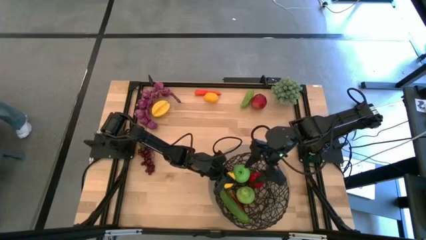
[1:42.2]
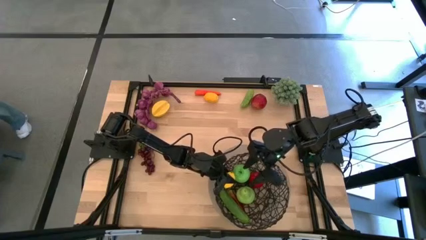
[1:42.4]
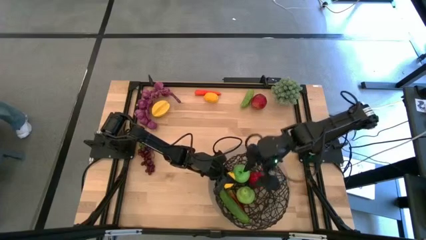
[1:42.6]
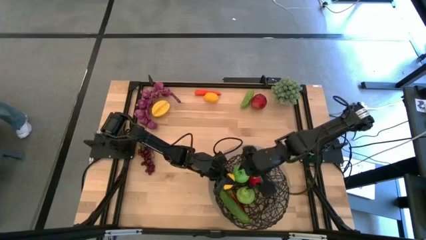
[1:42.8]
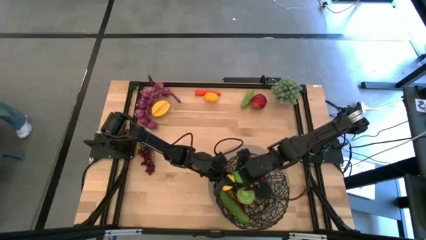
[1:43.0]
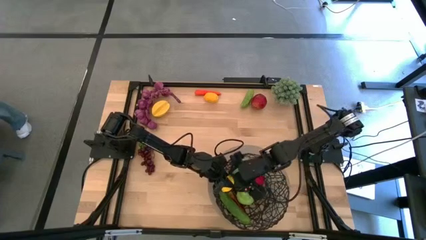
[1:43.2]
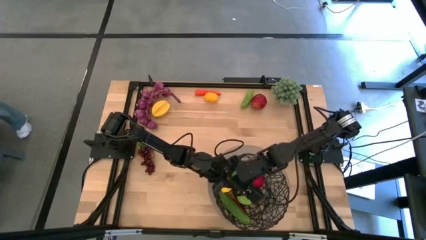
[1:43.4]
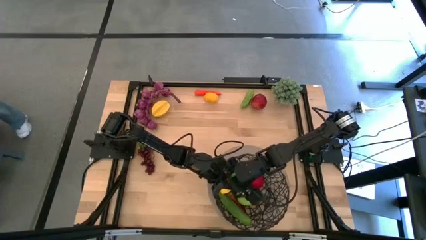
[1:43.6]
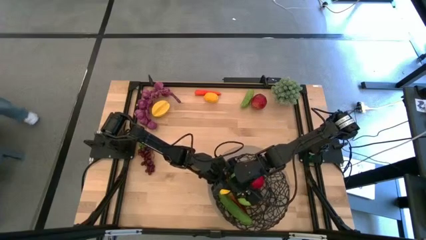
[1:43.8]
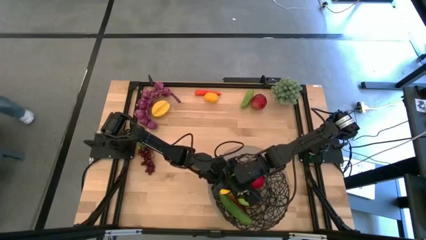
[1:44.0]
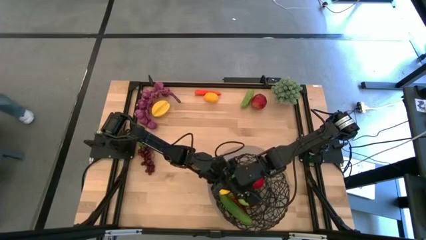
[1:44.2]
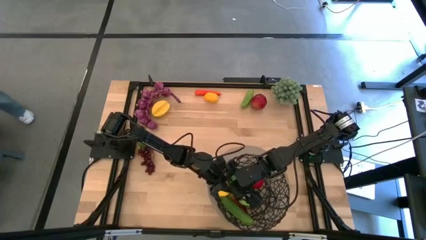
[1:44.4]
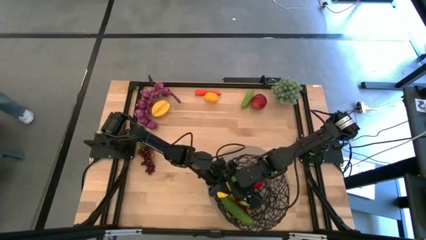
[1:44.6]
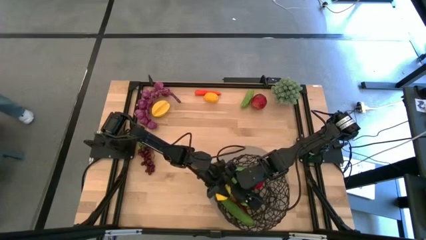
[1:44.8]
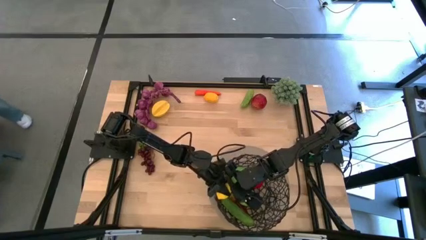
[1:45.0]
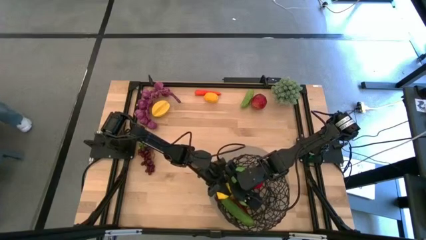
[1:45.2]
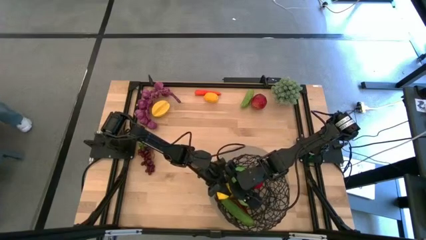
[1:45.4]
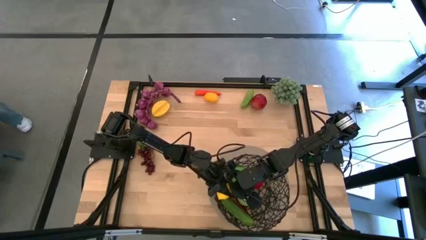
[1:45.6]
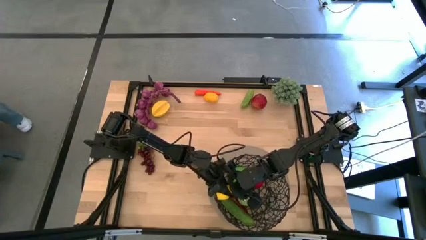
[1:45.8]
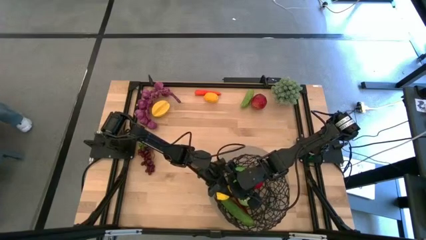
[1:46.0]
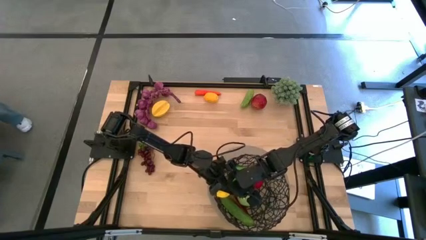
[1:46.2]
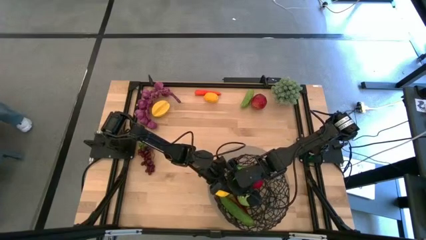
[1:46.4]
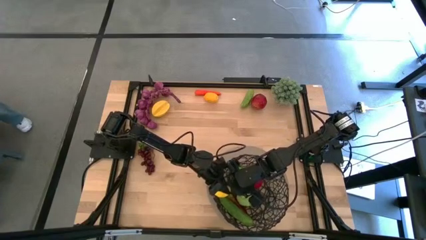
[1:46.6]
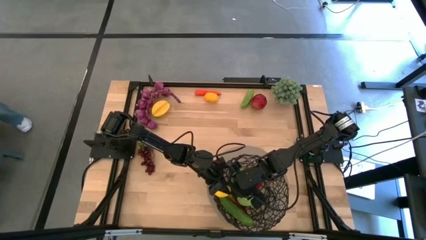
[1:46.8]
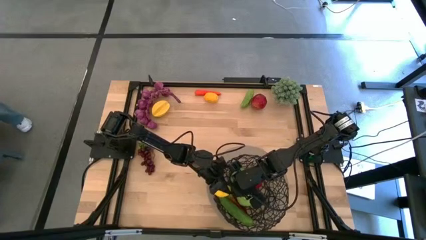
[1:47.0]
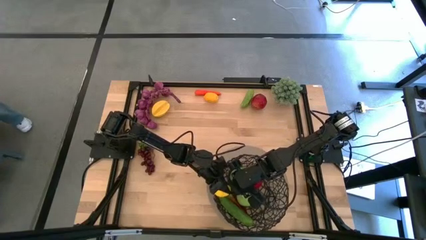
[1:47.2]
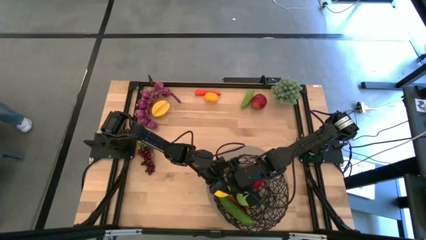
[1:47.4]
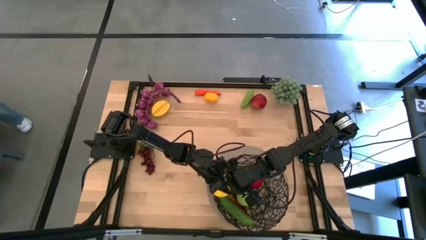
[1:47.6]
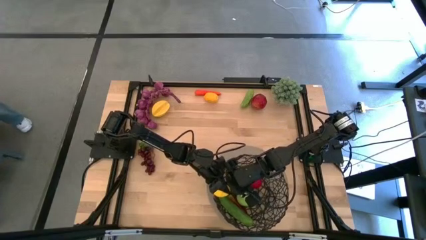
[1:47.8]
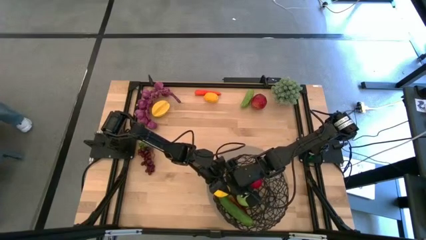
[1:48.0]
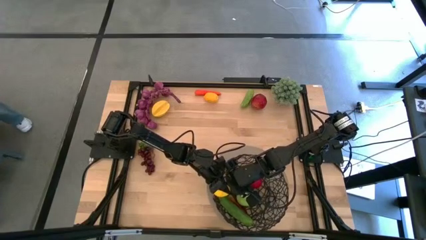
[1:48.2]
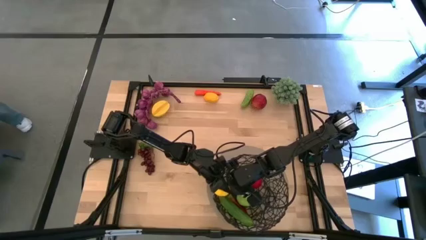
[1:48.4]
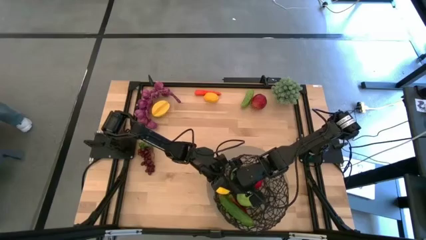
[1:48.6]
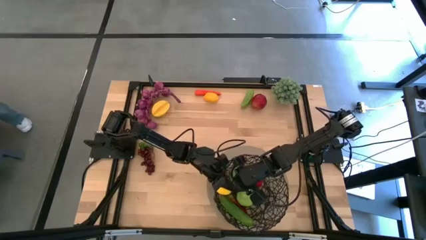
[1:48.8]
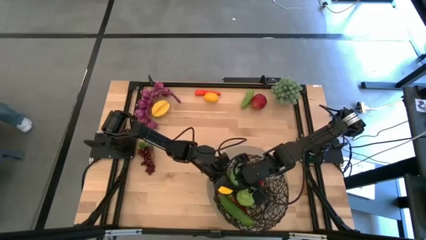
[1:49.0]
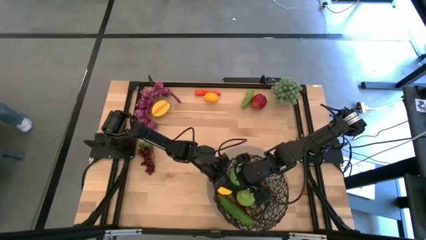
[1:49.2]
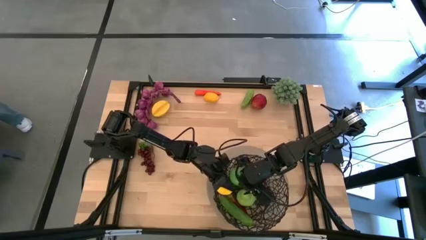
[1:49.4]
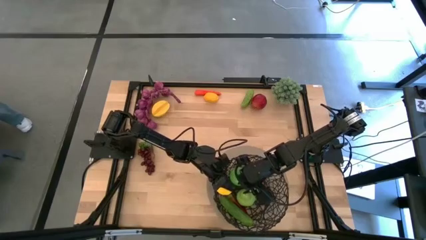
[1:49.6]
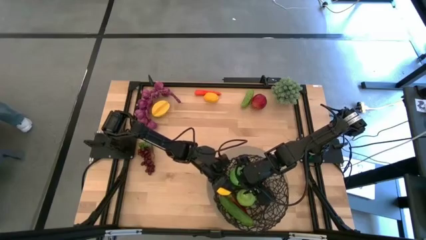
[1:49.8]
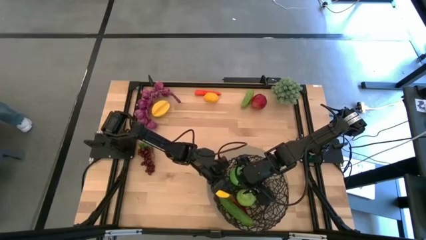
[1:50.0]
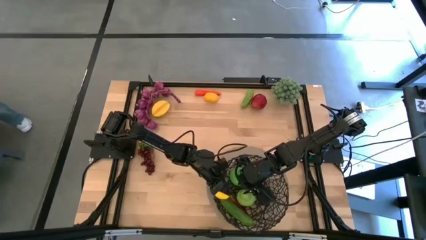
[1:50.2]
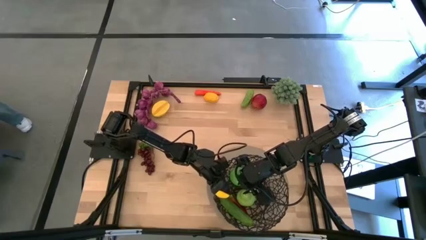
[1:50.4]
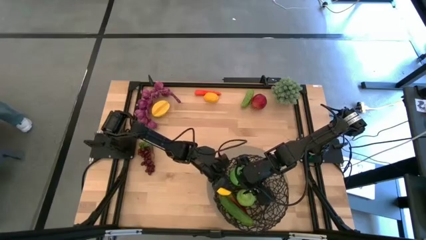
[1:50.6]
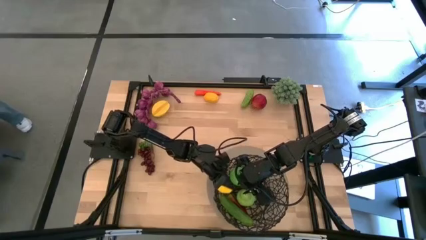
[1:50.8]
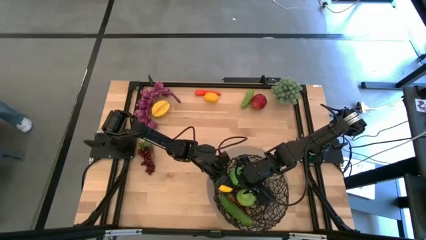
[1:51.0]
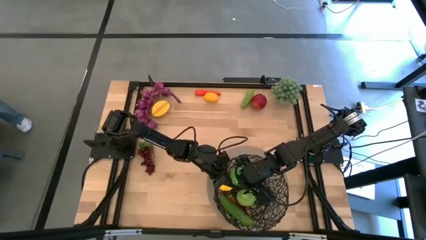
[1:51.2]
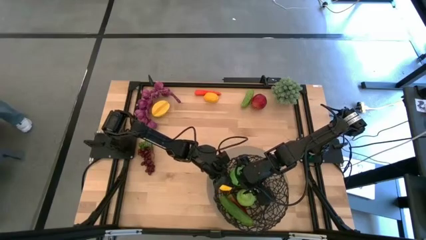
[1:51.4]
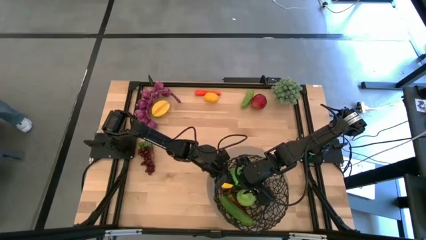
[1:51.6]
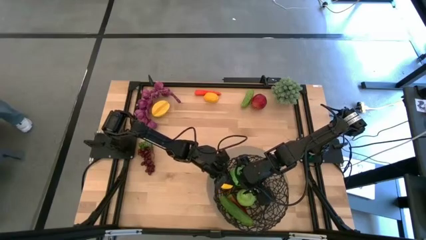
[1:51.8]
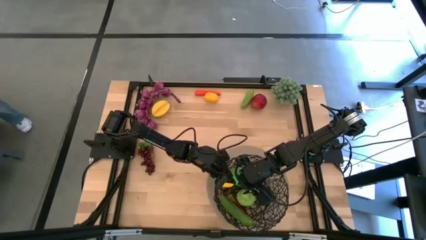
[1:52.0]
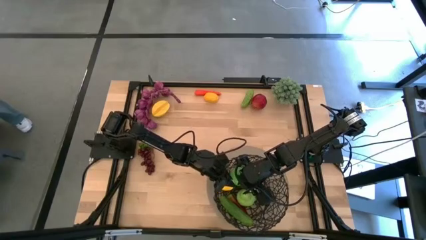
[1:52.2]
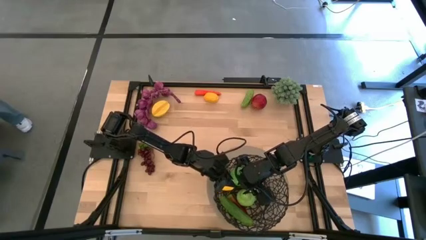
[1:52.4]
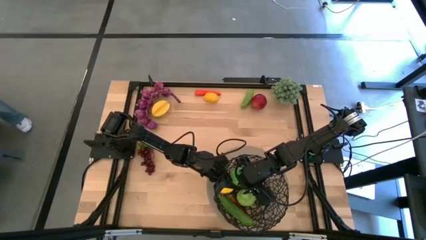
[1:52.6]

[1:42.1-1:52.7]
Task: Build produce basket
Put the bottom yellow lemon into the wire basket

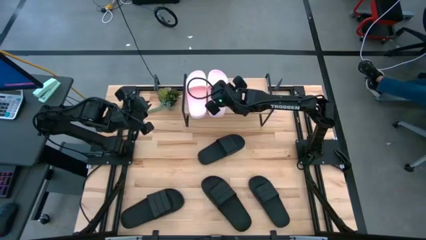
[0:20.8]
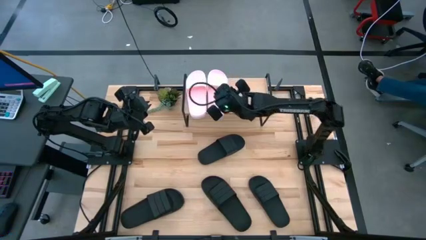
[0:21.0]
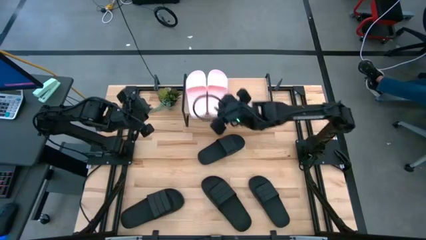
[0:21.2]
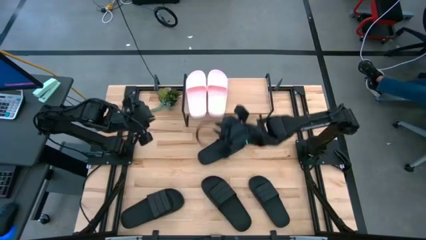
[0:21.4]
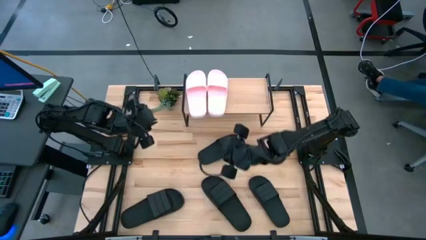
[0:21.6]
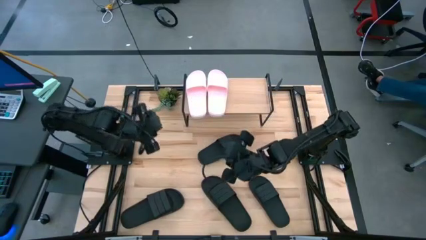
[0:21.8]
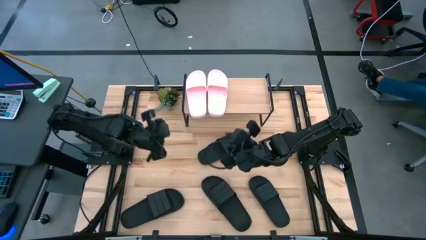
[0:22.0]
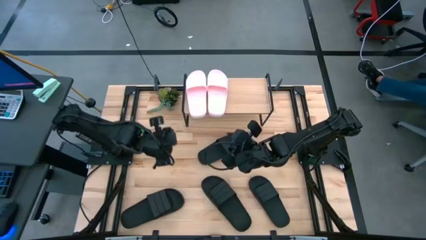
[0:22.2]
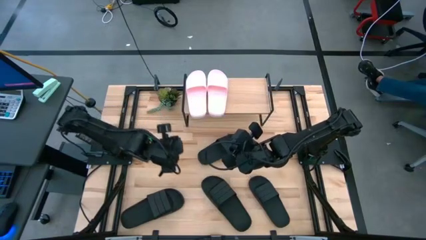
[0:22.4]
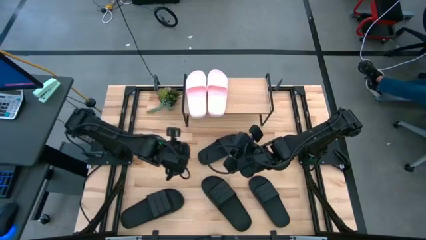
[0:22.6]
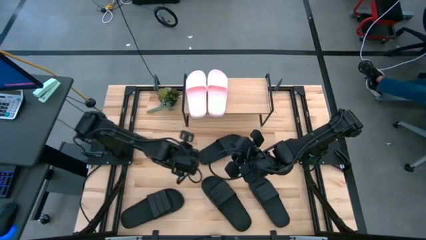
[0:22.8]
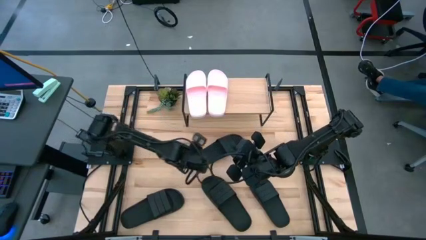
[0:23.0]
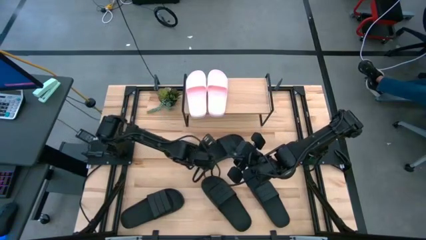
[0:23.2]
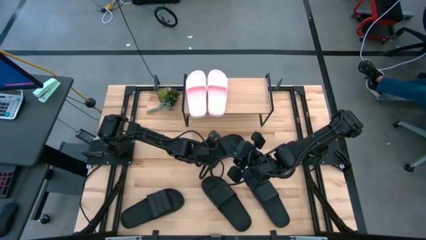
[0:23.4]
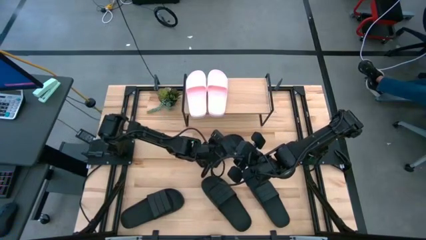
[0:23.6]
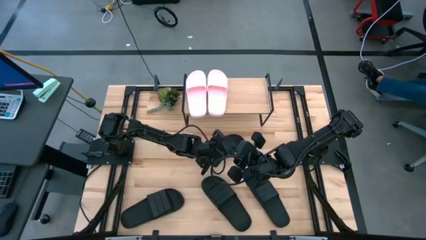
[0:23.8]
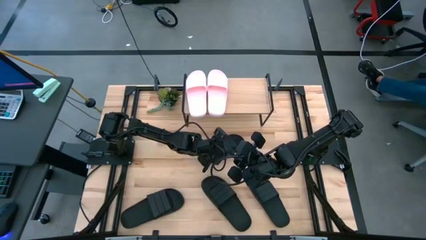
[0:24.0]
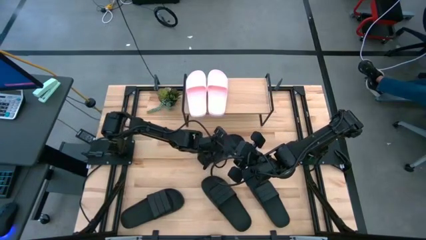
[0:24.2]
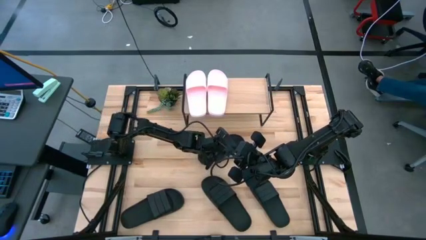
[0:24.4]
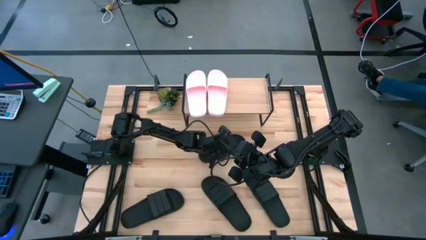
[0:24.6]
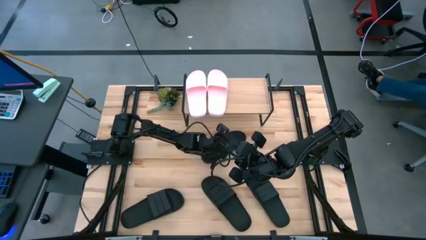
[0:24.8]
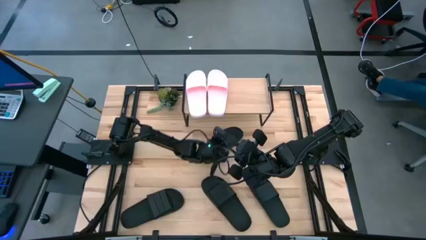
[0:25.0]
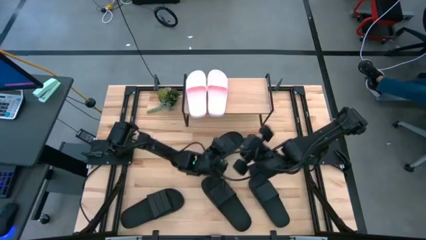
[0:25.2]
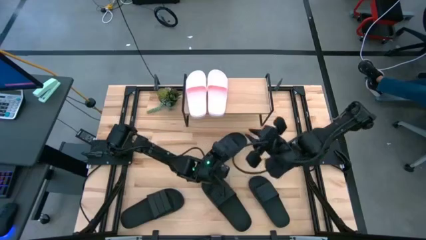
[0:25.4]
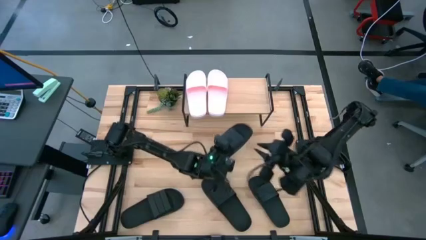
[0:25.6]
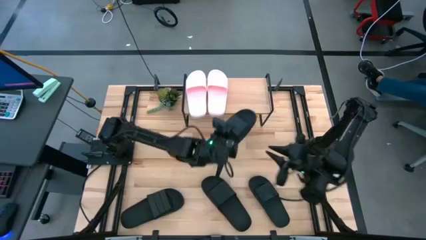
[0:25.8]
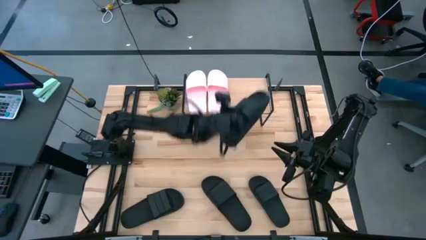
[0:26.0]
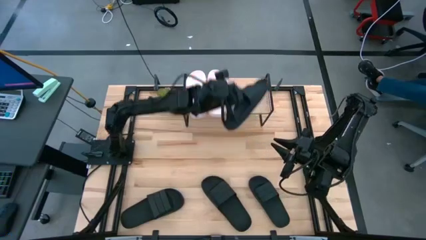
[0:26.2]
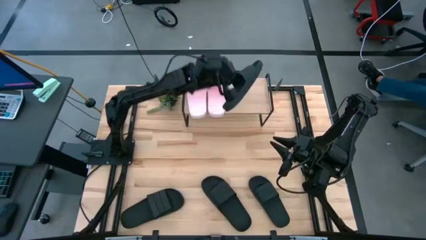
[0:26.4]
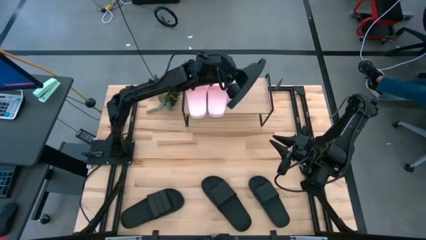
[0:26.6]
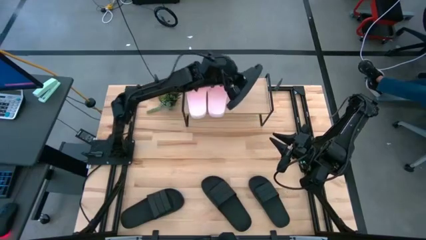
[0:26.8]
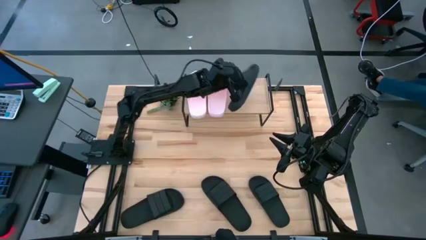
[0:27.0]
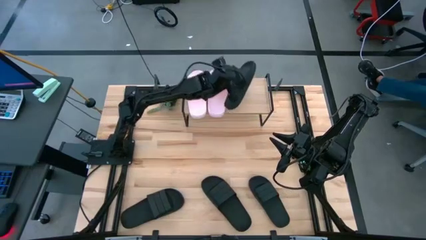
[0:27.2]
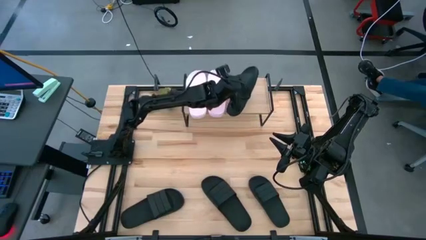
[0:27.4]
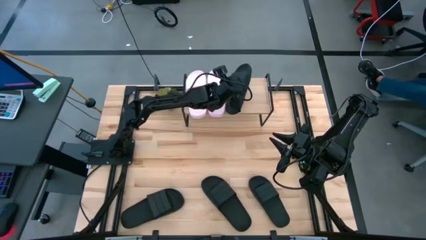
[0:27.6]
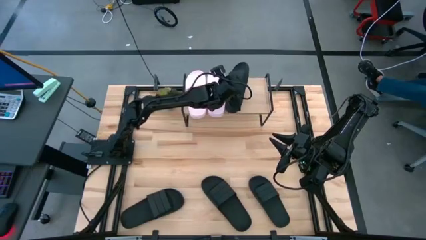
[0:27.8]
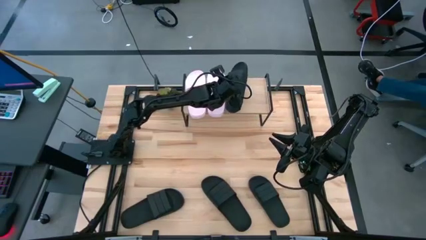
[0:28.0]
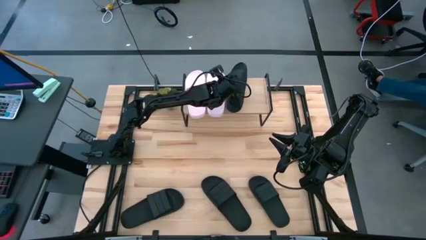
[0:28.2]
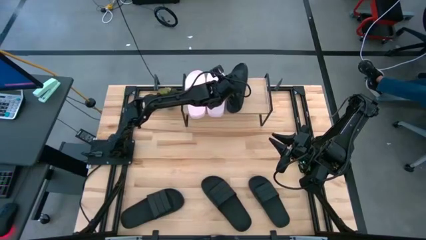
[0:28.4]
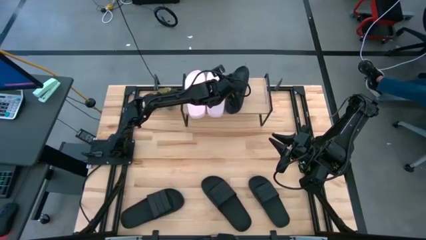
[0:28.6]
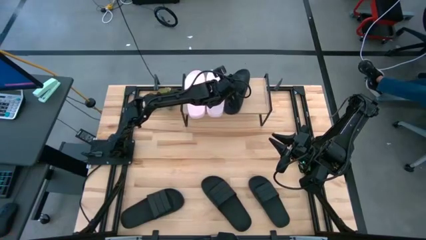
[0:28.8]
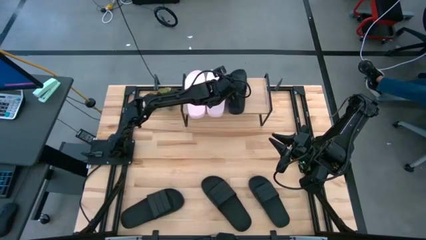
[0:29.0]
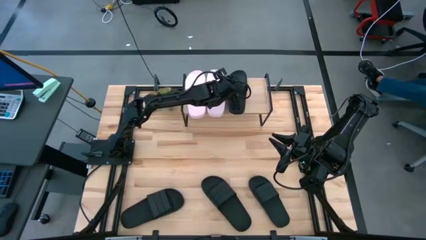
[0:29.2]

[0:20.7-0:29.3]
Task: Pick and place slides into the shelf
Put the top black slide on the shelf
